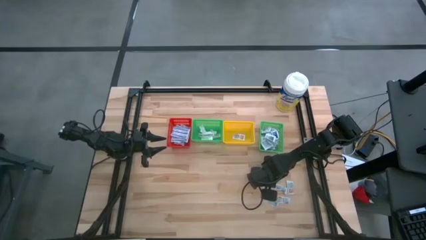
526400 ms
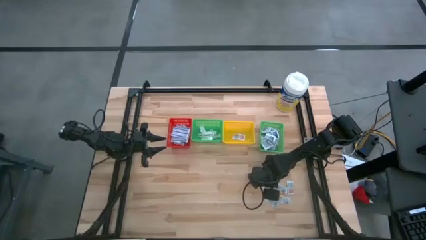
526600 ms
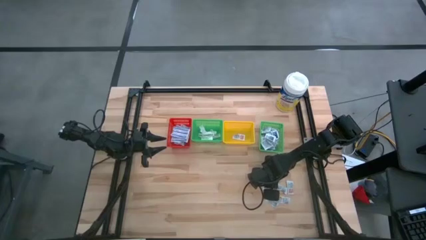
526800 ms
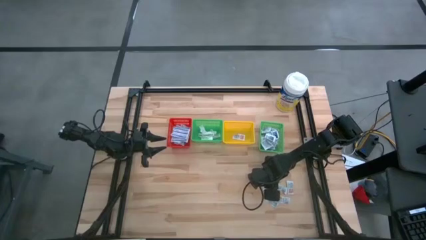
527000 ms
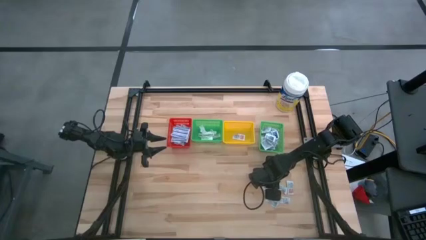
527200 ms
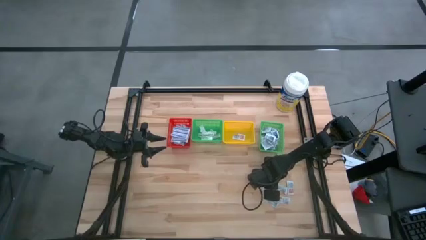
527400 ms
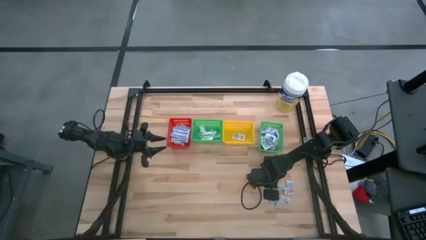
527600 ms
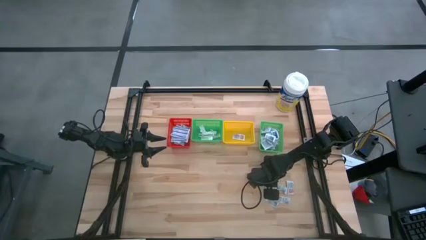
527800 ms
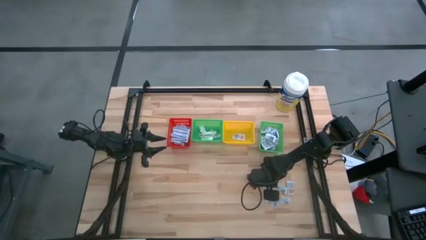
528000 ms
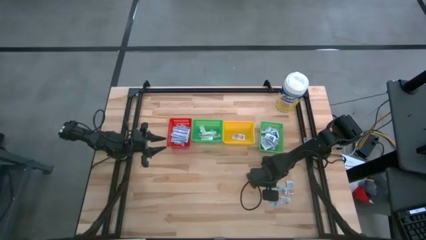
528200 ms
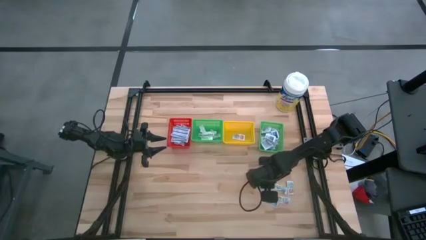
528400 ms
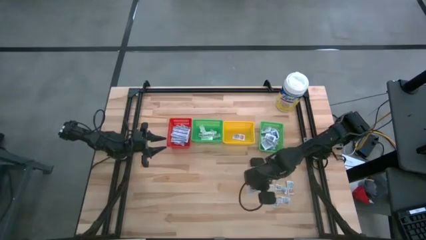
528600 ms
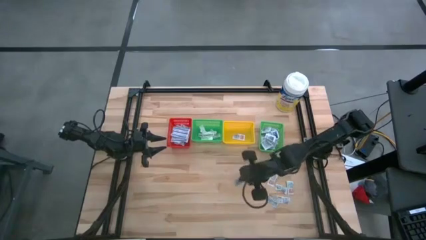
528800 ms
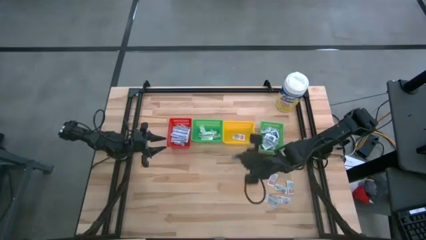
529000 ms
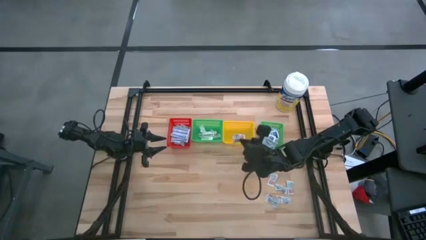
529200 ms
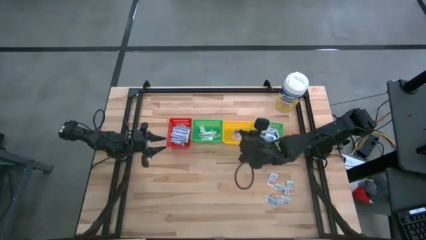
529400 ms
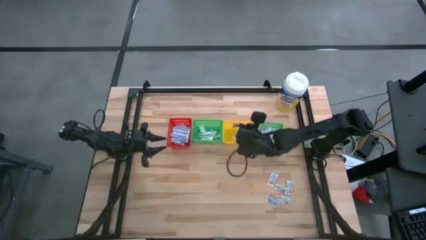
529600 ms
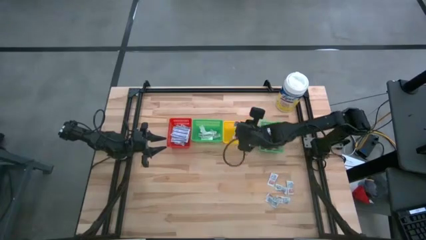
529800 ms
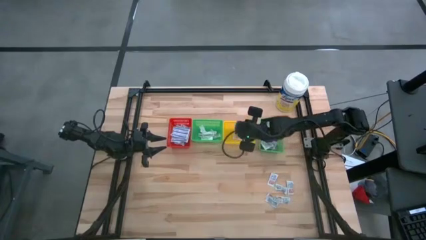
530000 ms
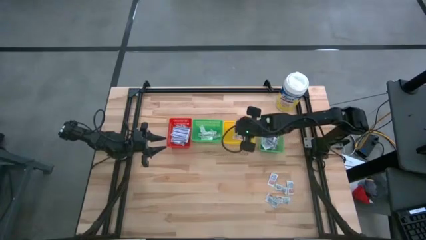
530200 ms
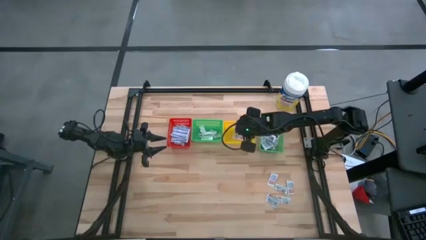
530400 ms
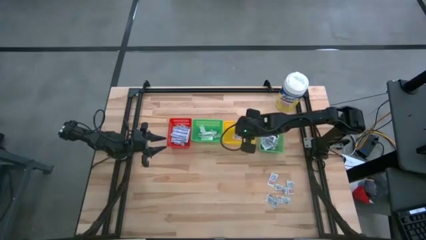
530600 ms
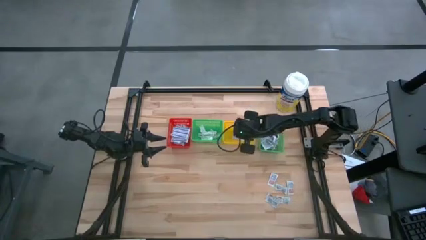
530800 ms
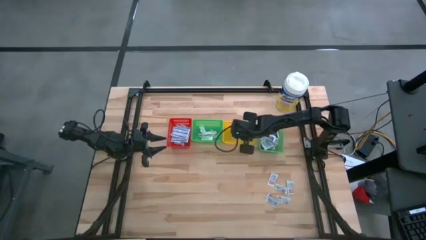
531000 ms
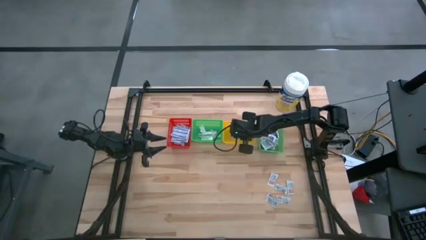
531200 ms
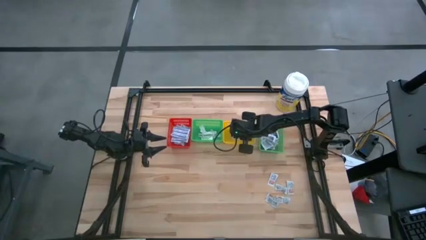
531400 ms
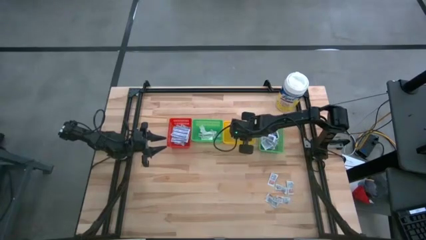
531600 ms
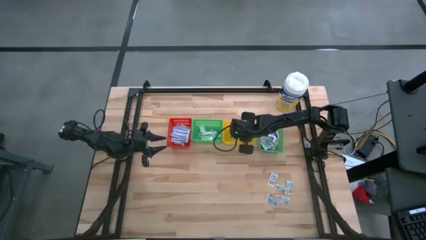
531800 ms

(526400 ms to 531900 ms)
Task: Pick & Place First Aid Supplies
Put the orange ointment pack into the yellow bin

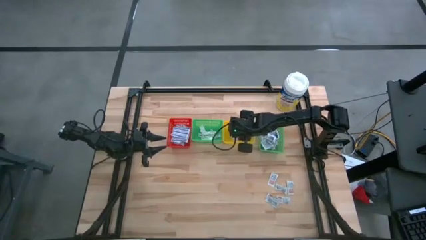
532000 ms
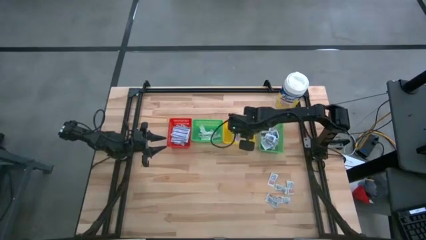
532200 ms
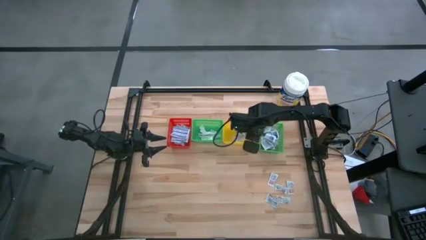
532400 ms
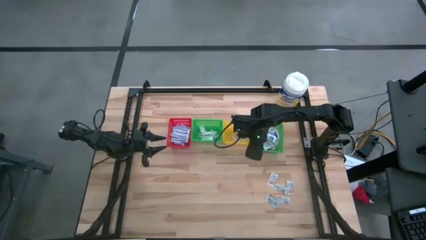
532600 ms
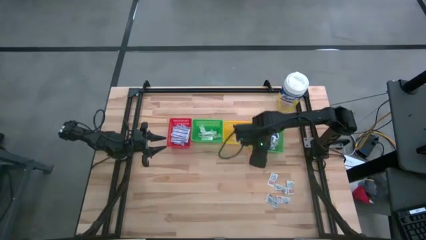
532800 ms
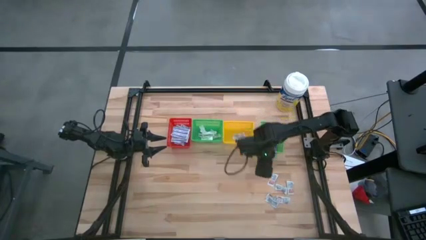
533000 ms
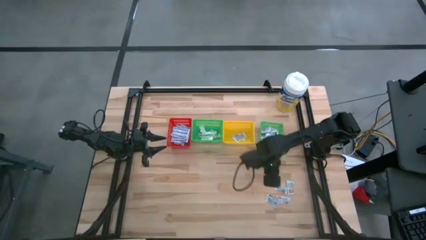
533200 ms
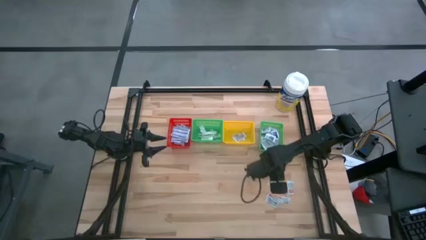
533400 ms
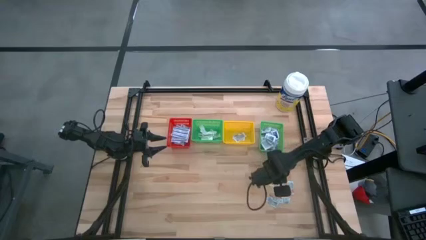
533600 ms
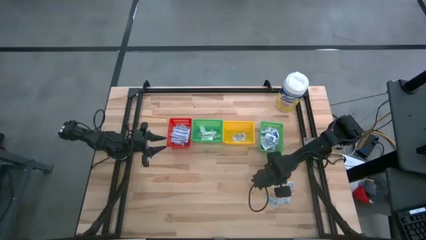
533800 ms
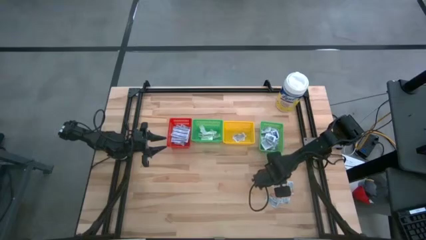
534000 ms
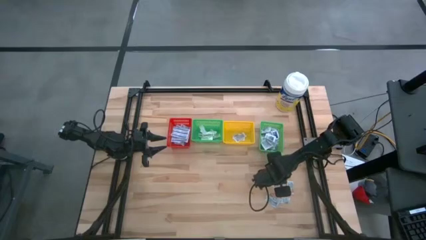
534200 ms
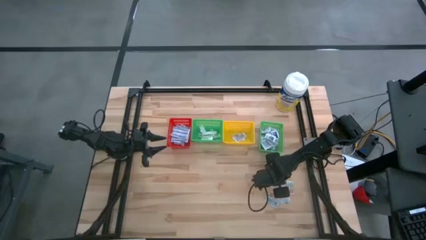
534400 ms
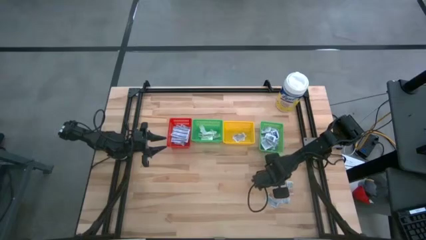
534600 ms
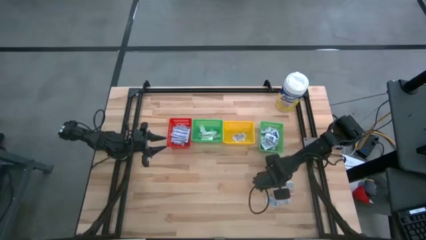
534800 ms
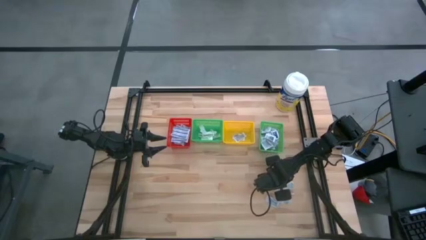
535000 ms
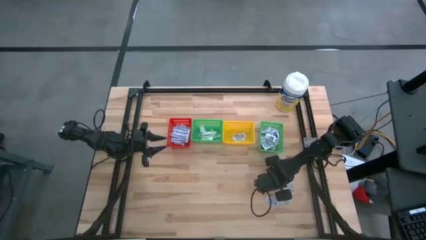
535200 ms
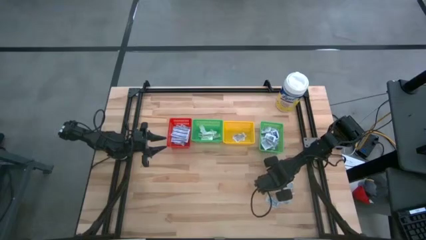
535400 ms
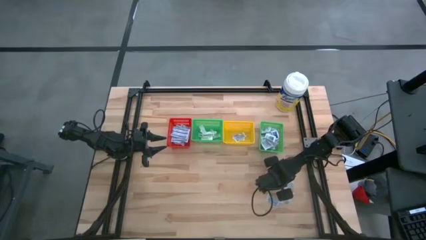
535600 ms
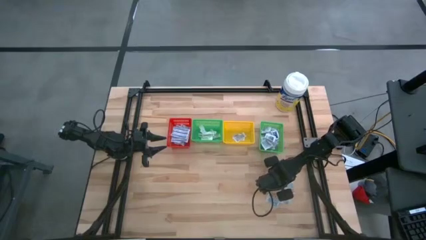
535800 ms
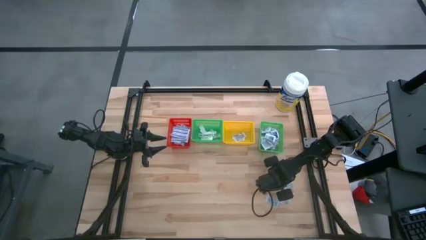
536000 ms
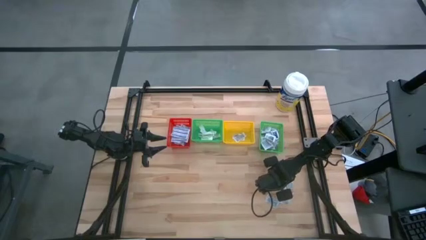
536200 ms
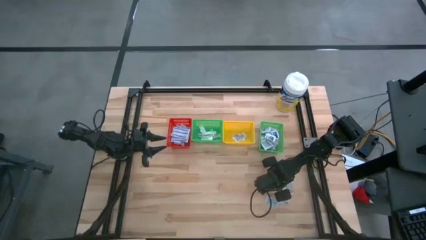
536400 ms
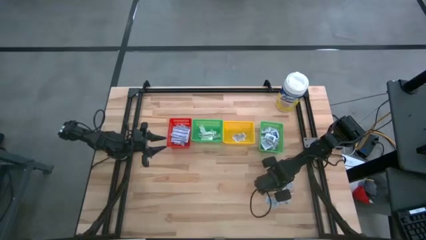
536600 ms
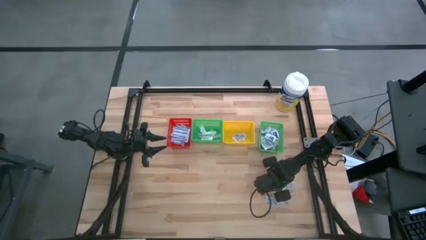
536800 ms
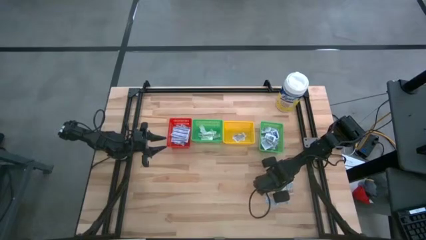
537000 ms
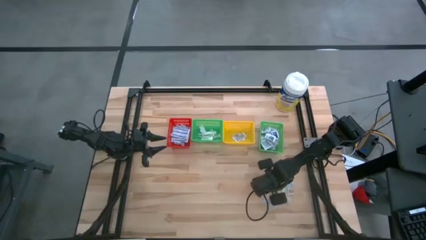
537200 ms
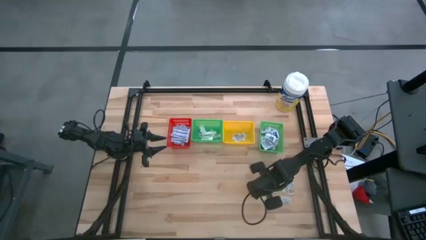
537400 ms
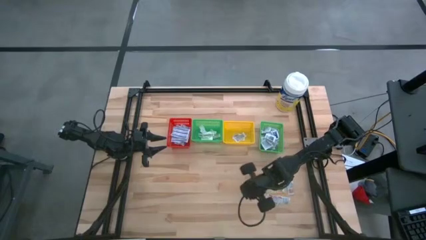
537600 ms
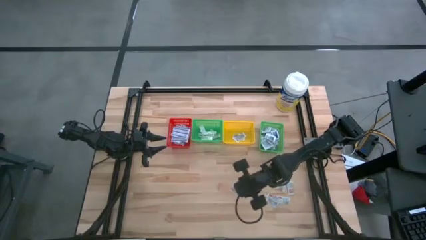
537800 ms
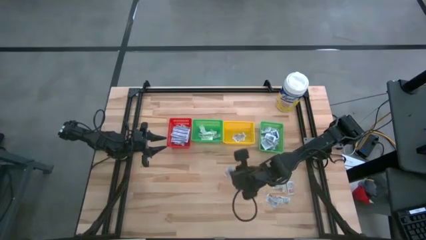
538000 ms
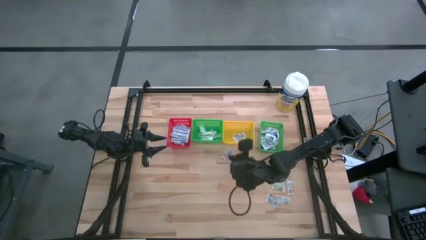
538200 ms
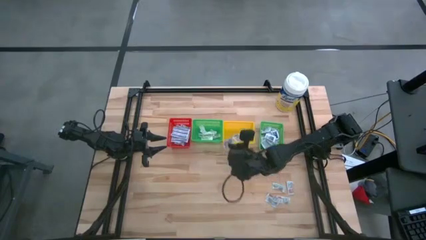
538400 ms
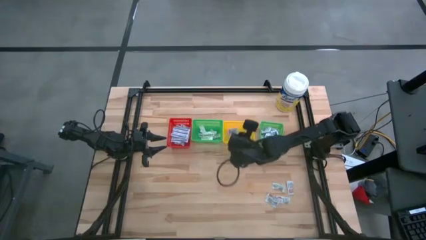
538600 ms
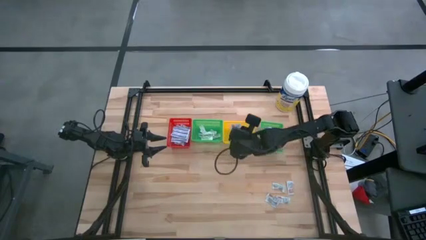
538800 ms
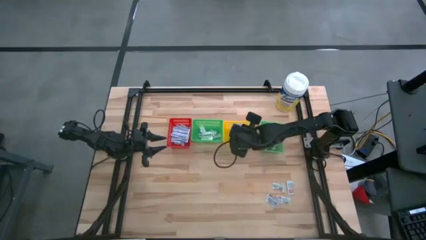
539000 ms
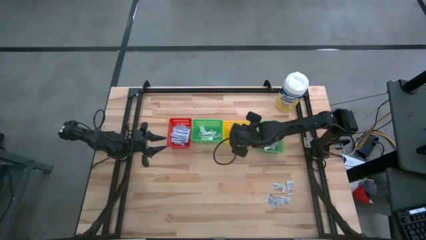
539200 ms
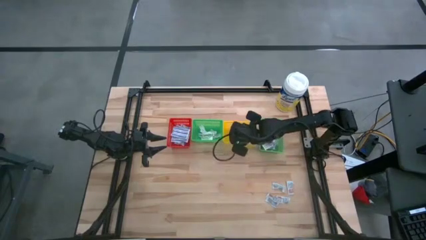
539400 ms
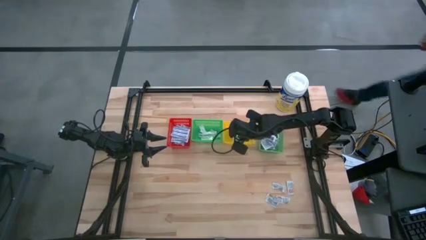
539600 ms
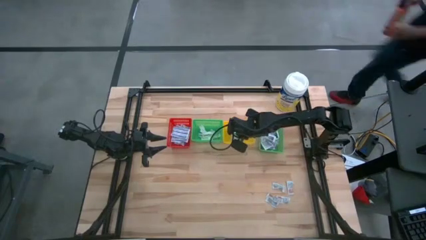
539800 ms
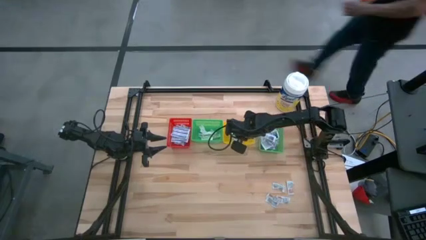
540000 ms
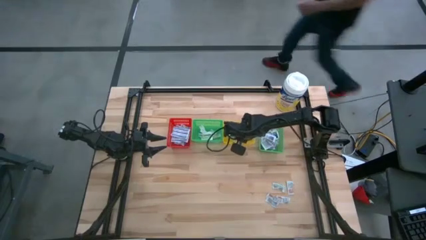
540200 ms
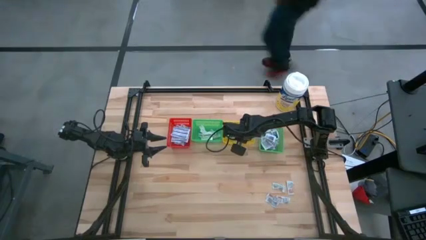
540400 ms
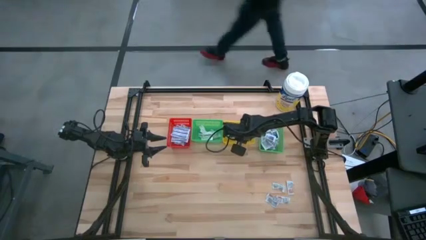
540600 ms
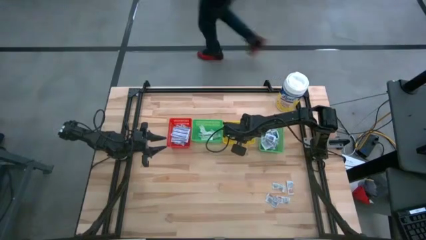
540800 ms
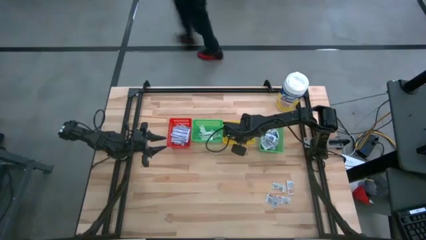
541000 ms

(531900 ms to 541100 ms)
Put the orange ointment pack into the yellow bin

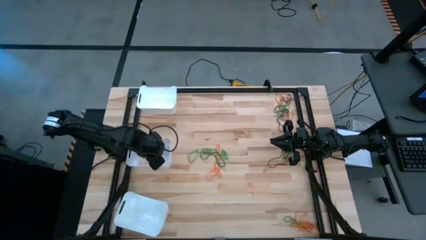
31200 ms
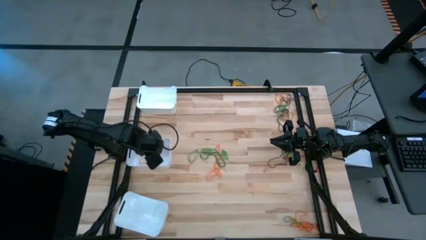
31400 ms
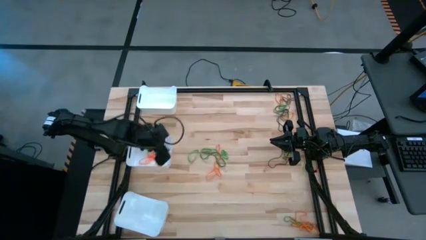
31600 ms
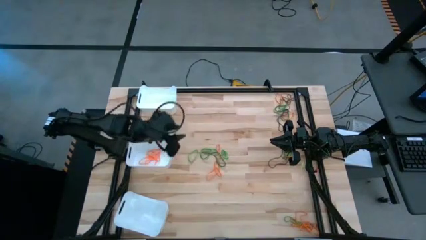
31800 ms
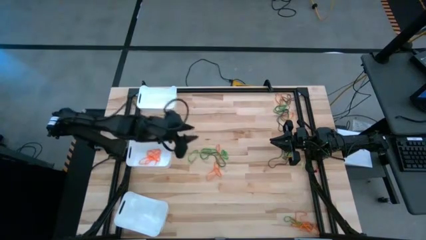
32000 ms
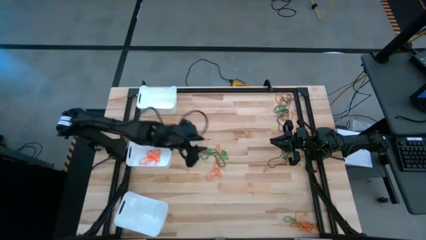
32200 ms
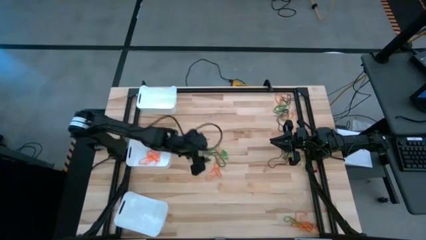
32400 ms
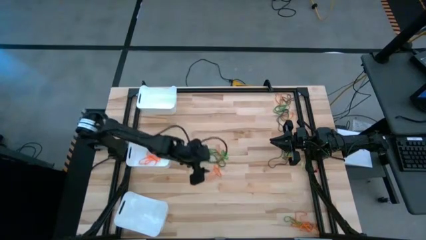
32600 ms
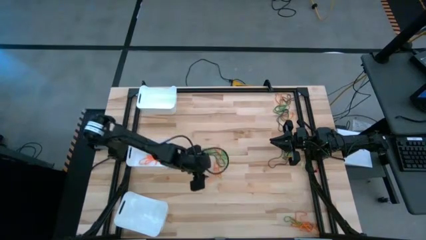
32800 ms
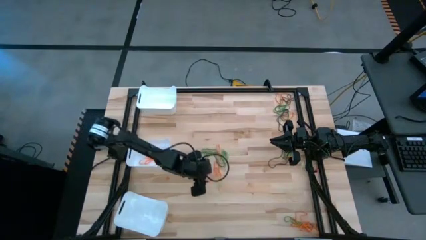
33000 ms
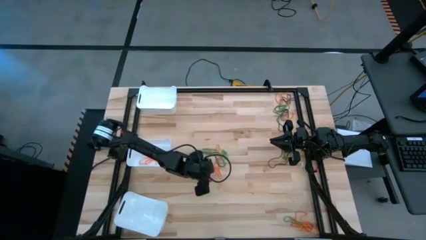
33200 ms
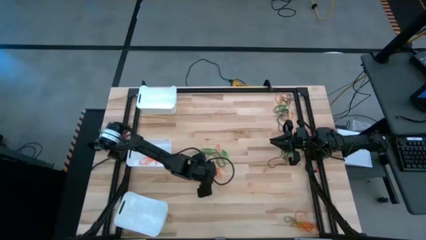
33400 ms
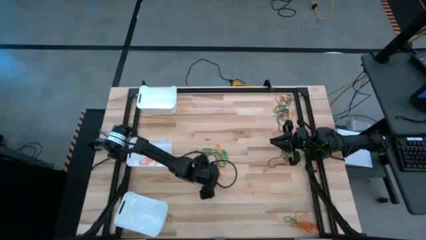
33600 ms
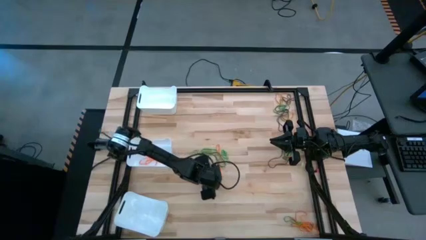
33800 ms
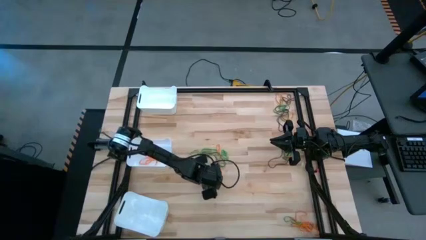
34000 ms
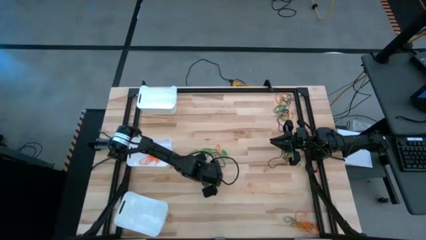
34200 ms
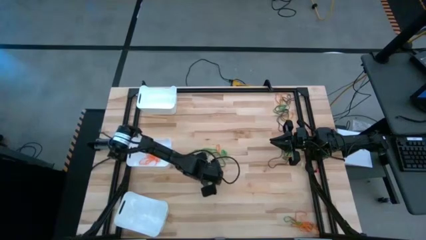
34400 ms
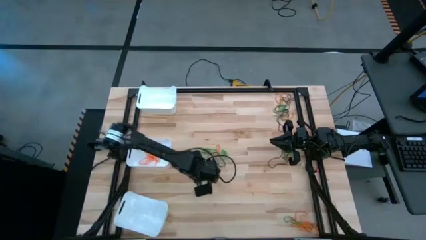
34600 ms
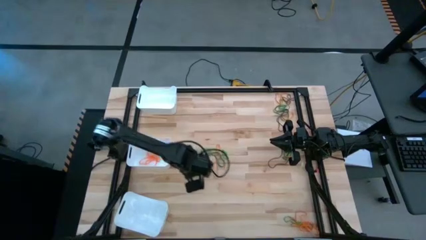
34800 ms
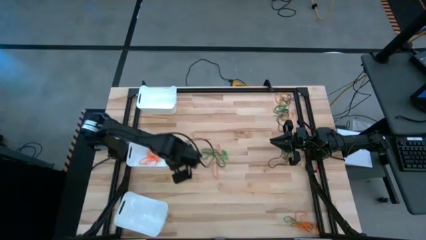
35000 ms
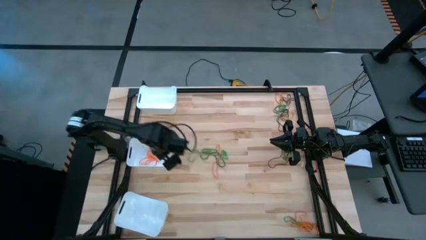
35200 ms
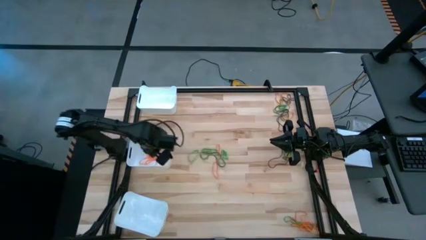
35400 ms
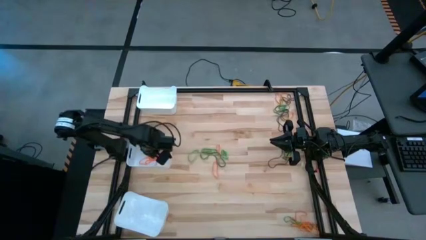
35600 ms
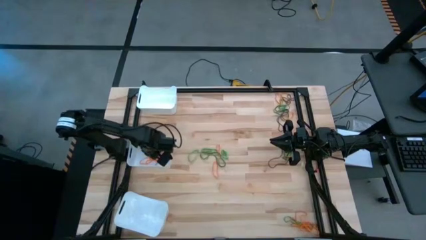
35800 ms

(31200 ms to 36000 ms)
Task: Sort rubber bands into baskets
Put the orange rubber band into the middle white bin
